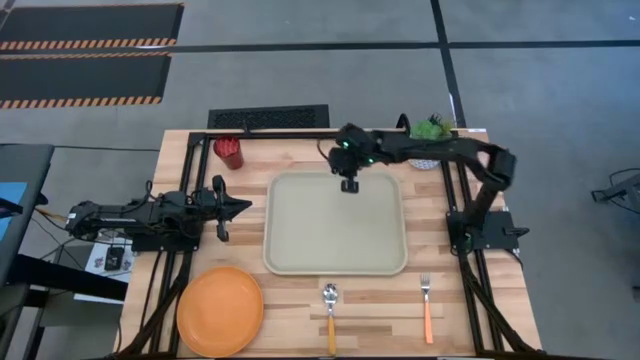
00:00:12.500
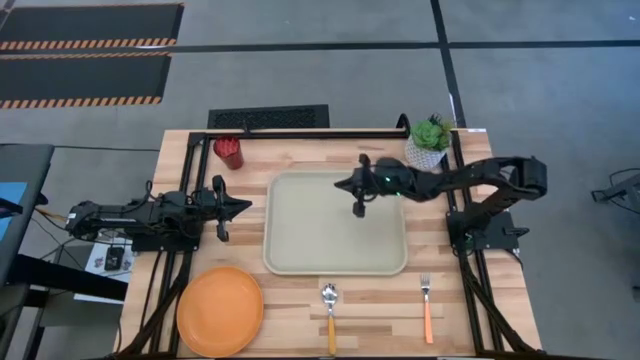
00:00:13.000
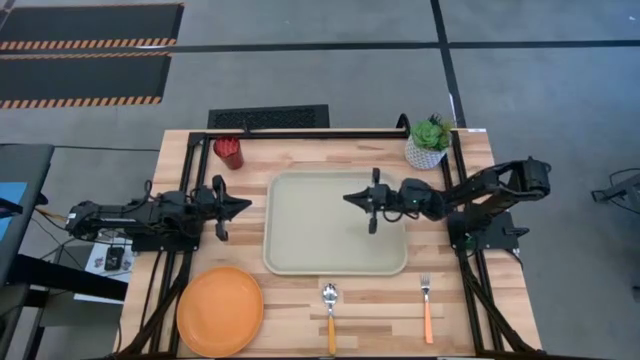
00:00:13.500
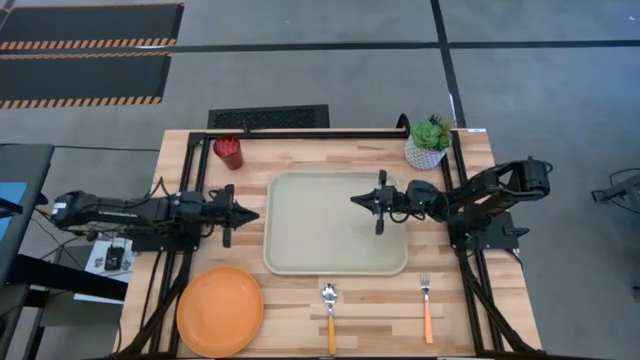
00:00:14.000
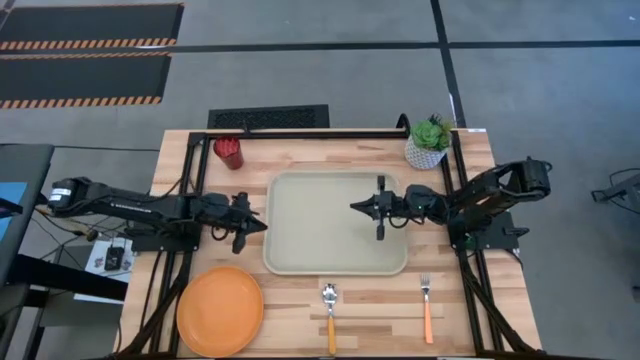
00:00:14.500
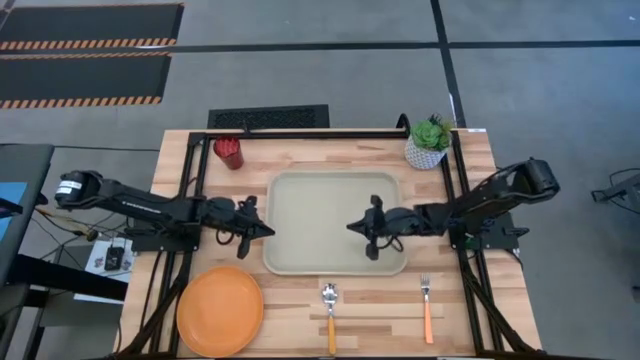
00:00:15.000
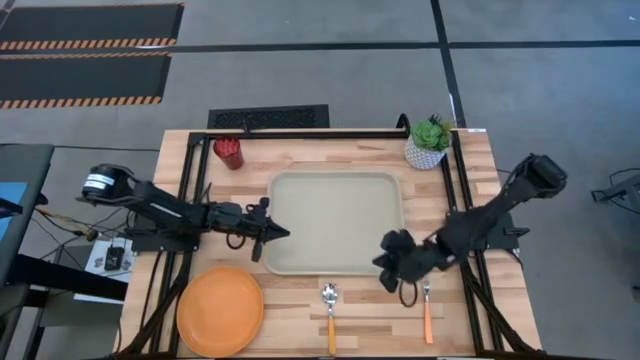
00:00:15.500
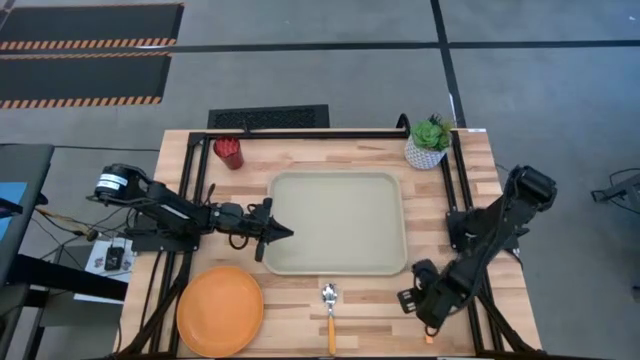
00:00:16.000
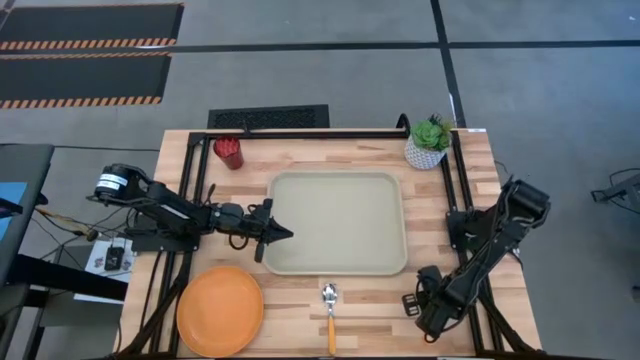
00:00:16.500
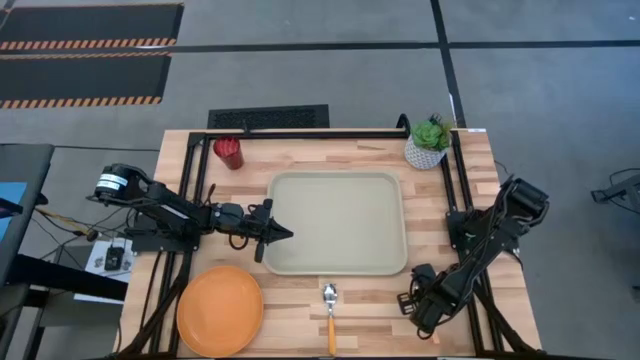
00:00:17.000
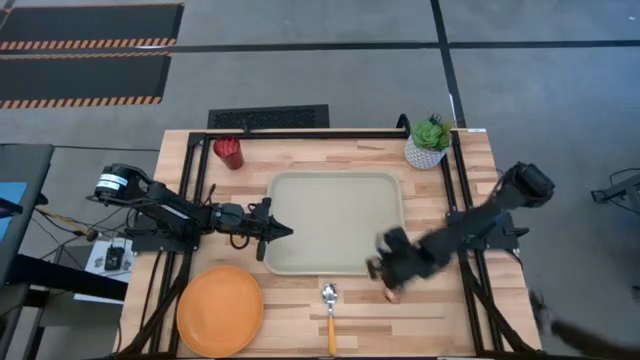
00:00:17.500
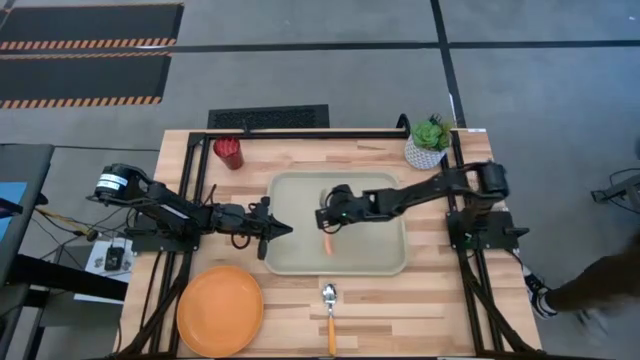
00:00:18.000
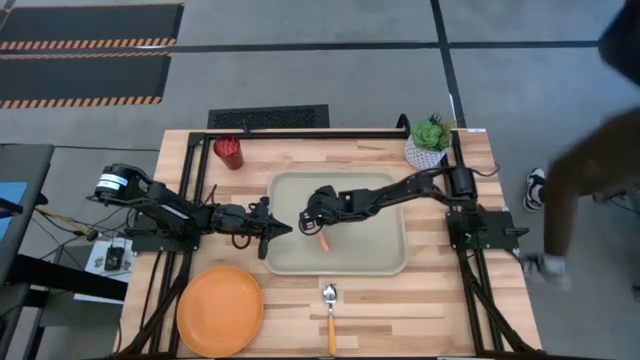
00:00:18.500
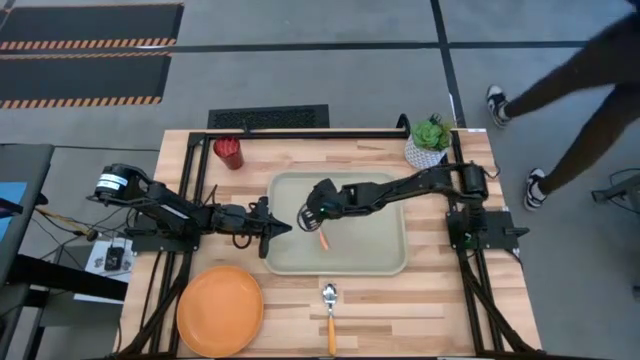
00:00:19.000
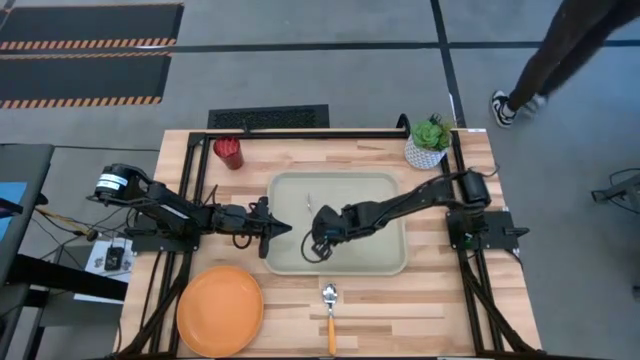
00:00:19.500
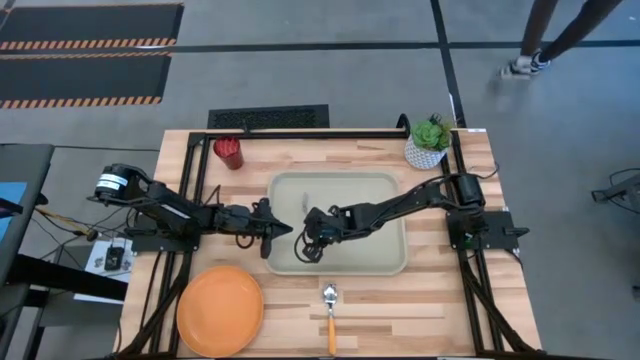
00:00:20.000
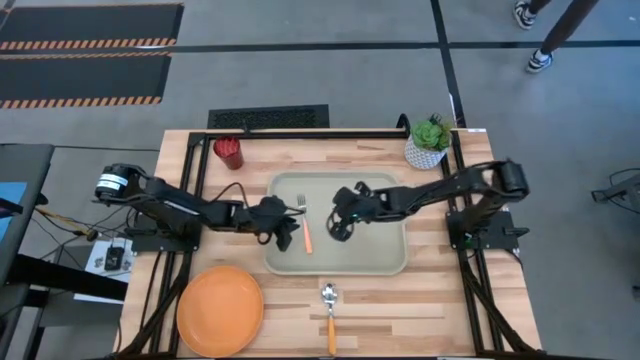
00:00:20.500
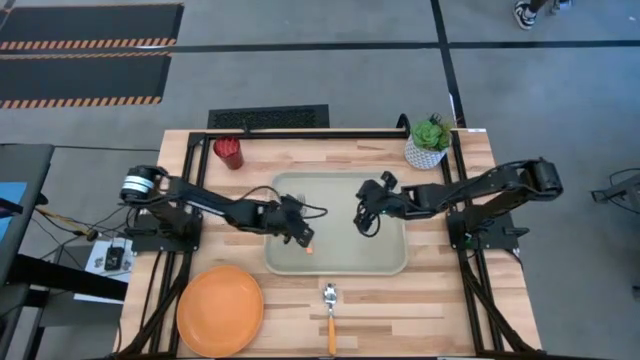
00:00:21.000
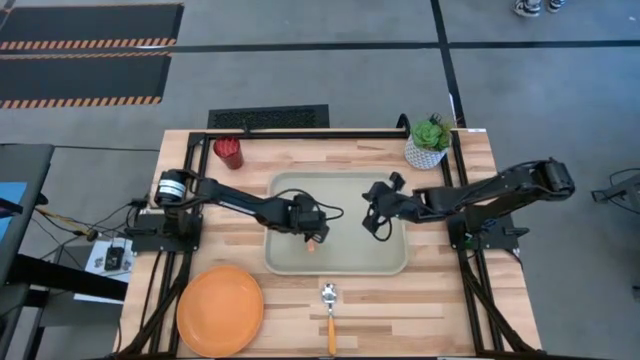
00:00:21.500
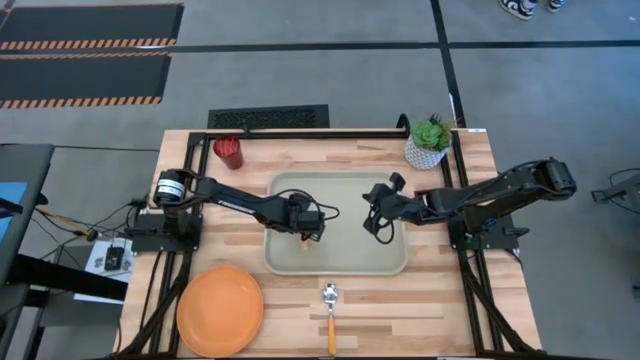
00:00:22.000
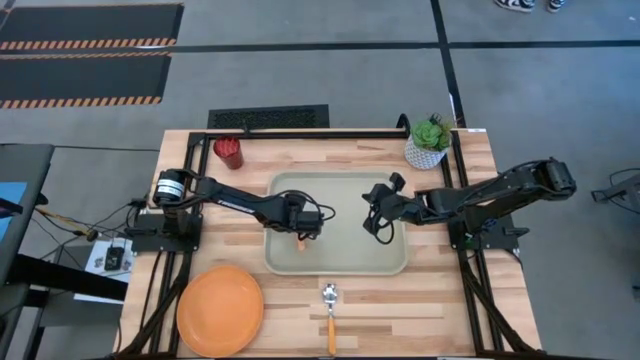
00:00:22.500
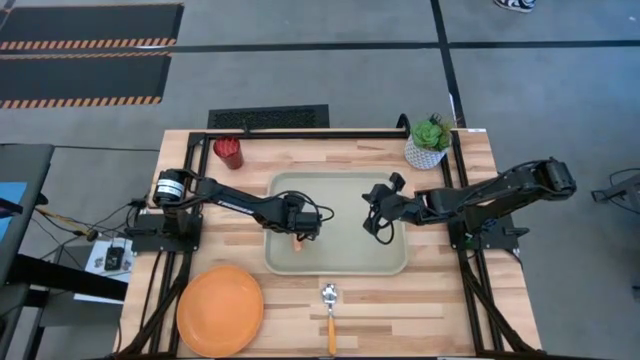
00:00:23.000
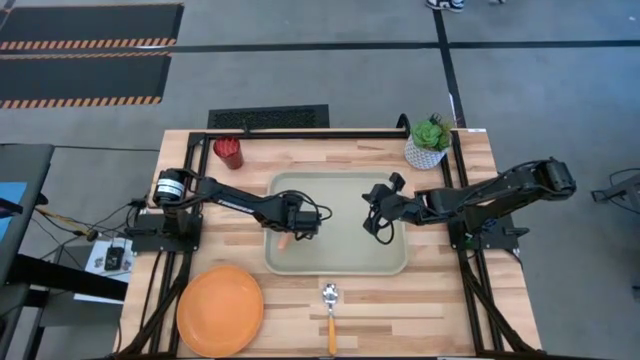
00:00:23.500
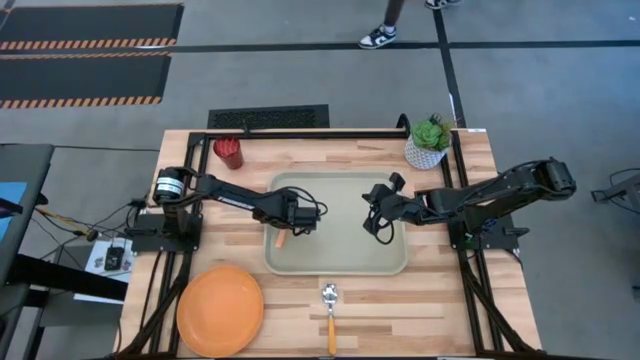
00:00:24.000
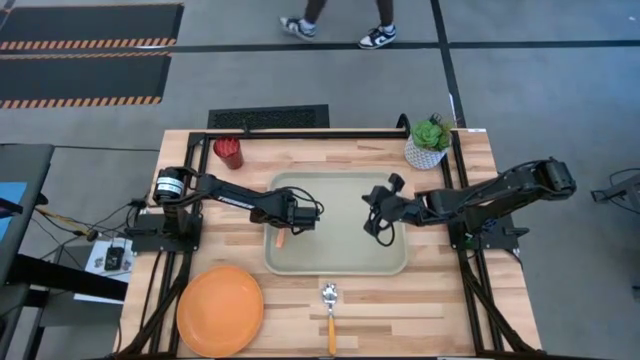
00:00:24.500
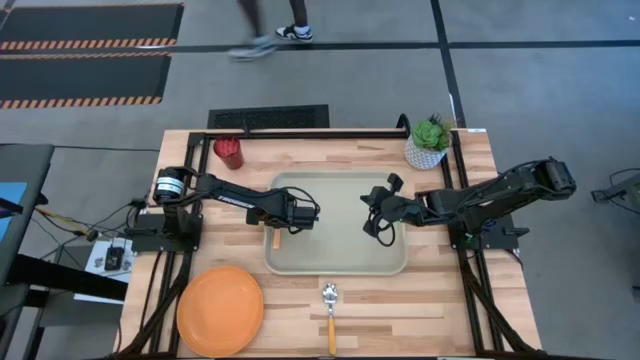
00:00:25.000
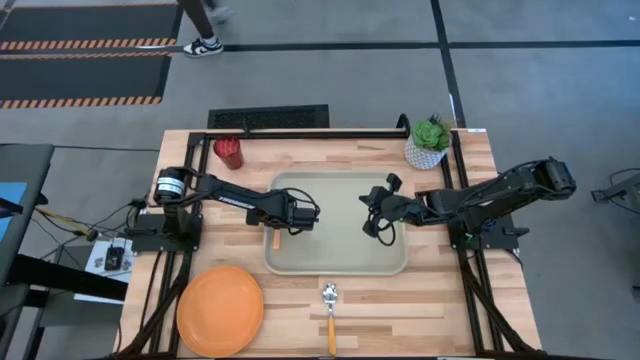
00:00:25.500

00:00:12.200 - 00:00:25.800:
Task: Pick and place plate/cup/fork/spoon on tray
Put the orange fork on the left of the light brown serving tray

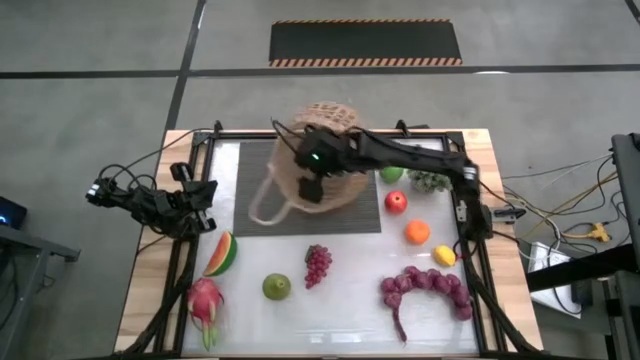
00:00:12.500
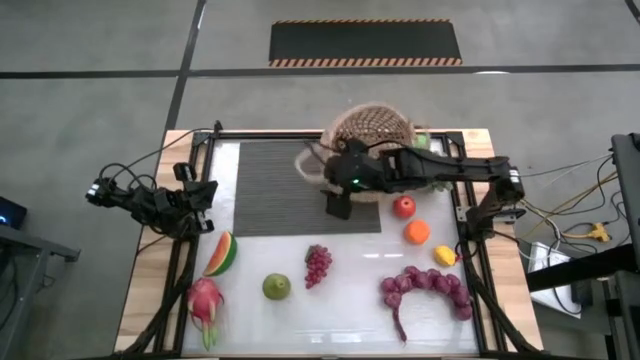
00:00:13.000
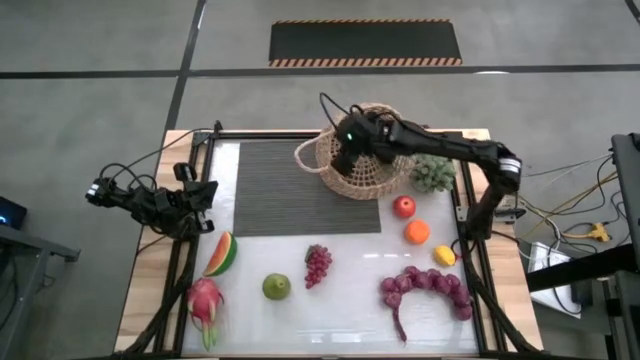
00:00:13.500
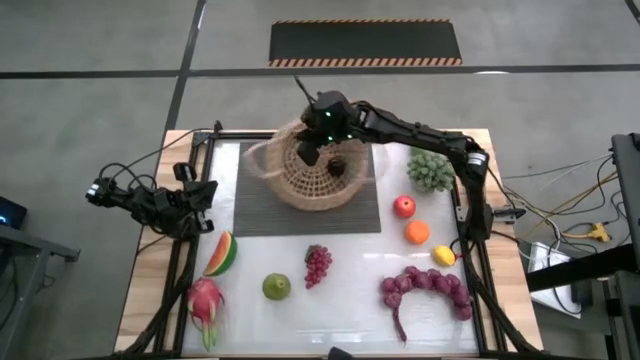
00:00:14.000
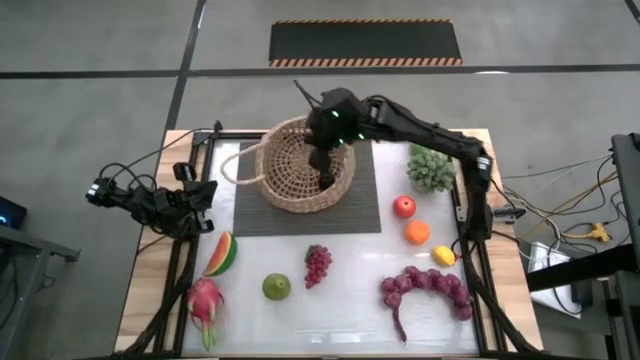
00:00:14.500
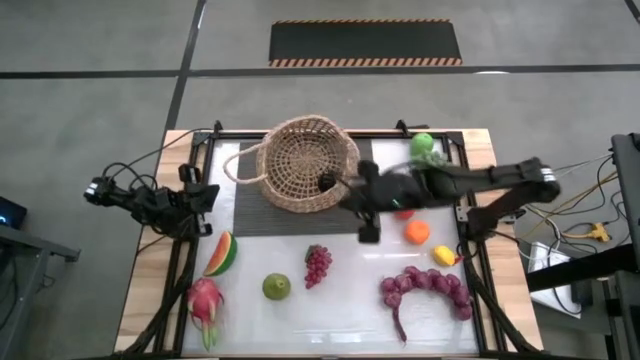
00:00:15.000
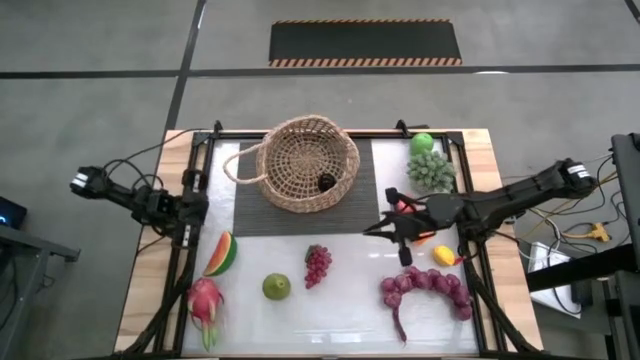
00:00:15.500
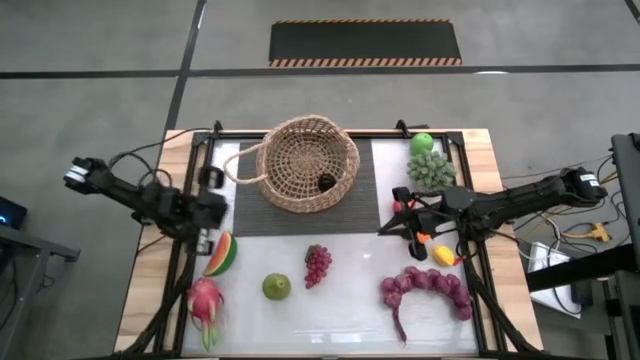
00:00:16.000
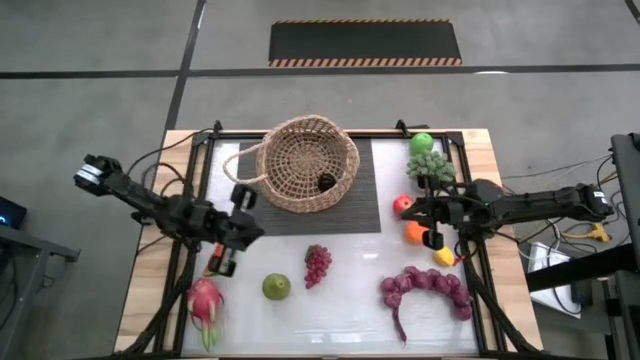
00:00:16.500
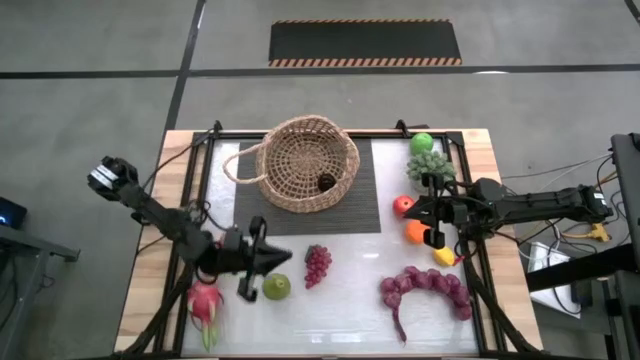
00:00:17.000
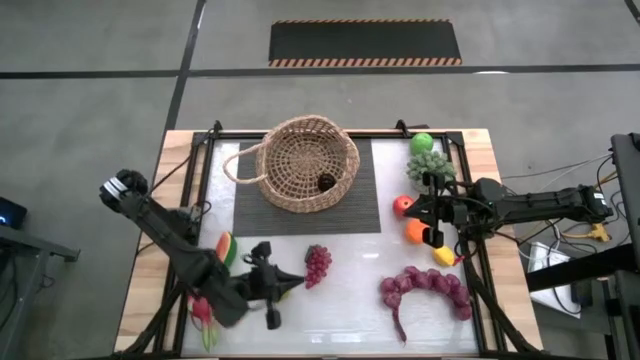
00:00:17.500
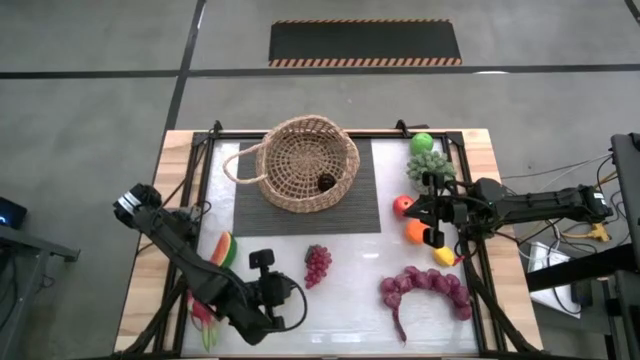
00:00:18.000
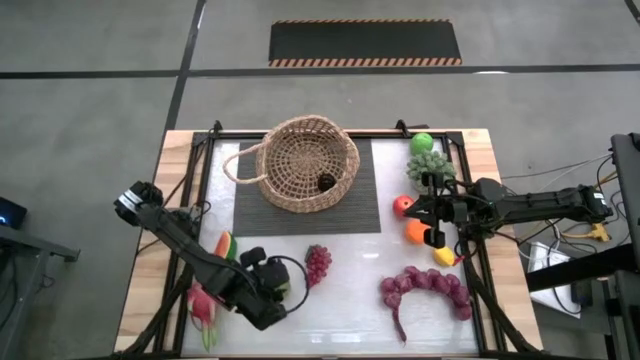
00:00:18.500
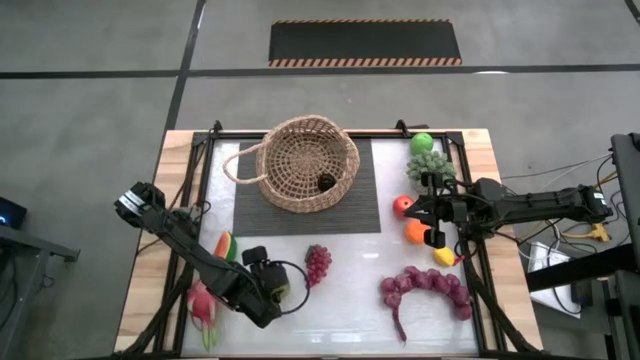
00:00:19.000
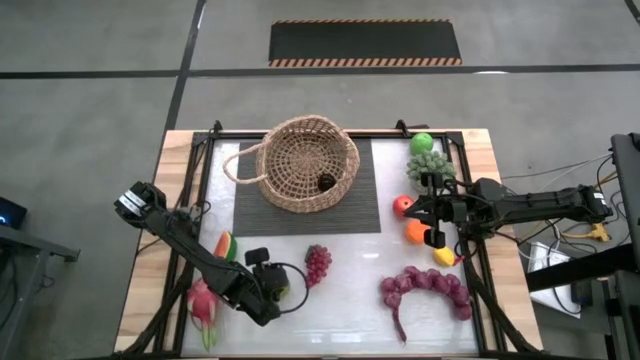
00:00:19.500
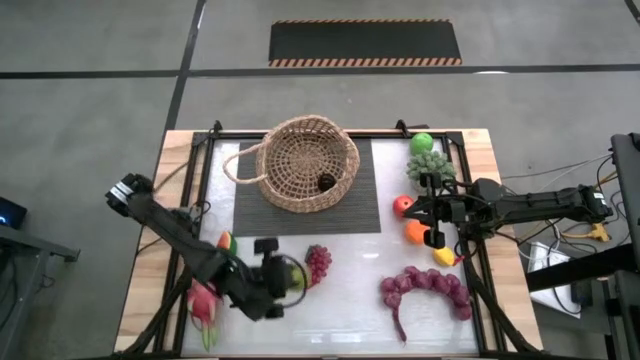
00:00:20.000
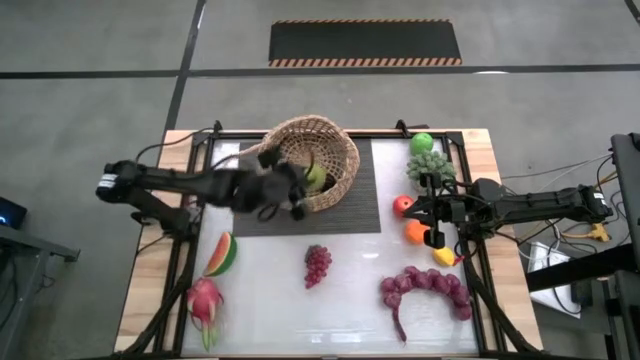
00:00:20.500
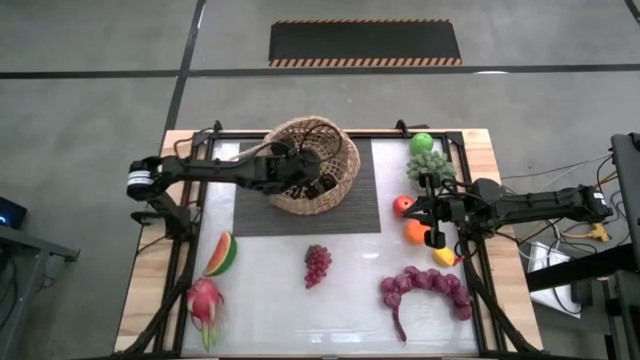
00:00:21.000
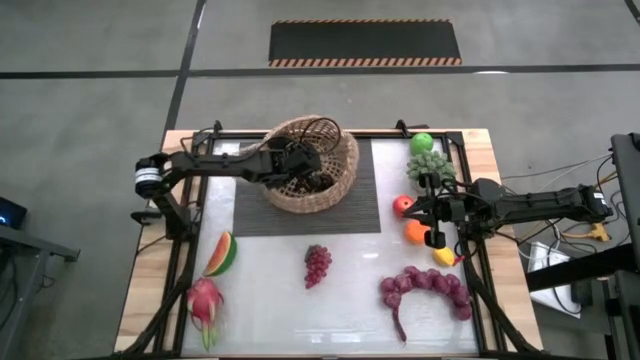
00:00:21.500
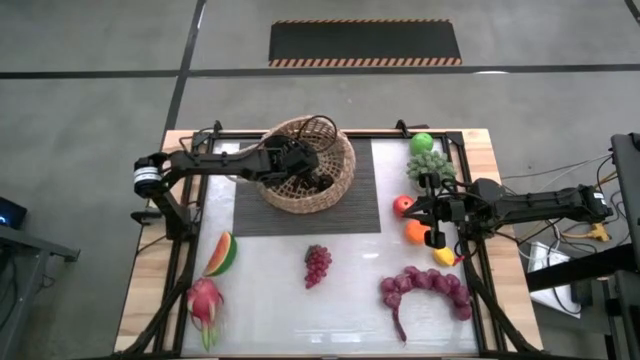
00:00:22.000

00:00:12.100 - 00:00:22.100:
Task: Build produce basket
Put the green pear into the basket
